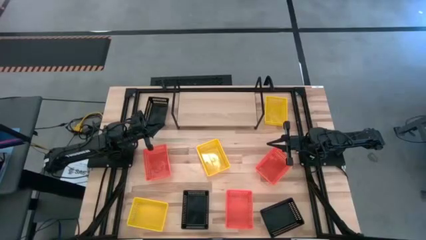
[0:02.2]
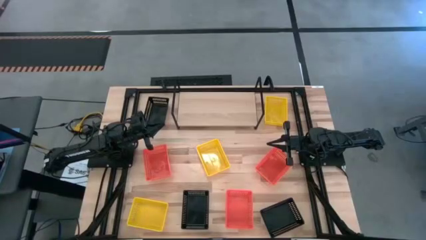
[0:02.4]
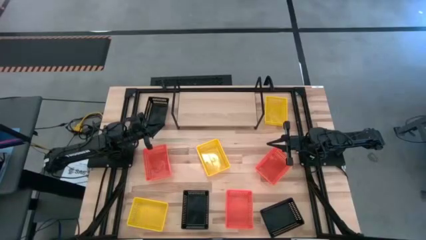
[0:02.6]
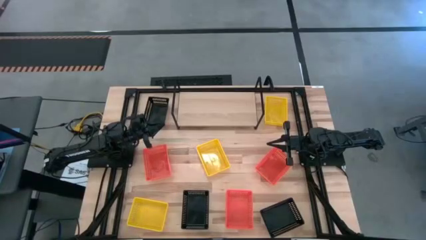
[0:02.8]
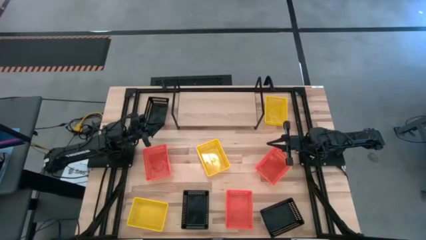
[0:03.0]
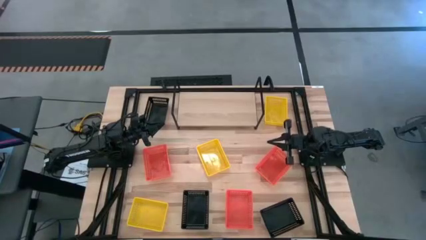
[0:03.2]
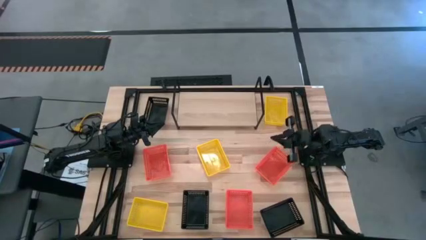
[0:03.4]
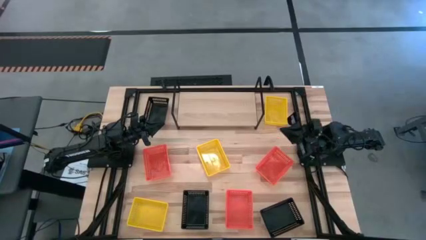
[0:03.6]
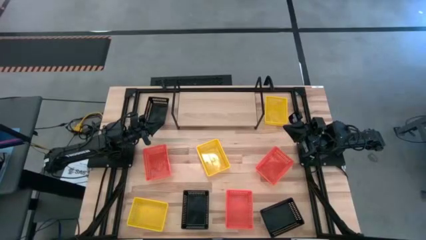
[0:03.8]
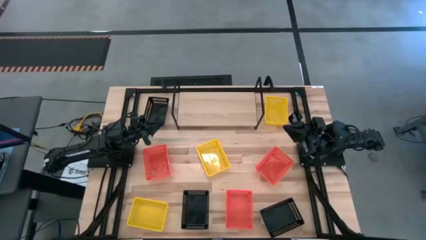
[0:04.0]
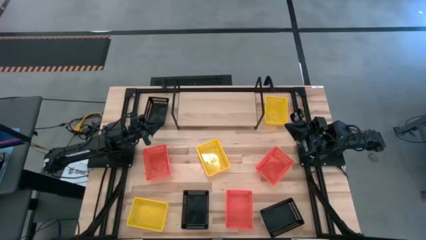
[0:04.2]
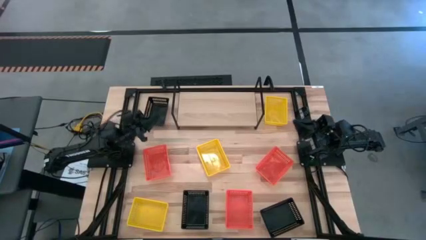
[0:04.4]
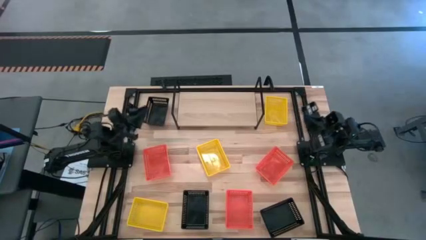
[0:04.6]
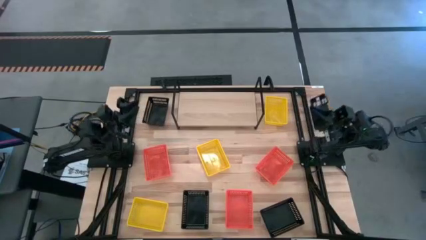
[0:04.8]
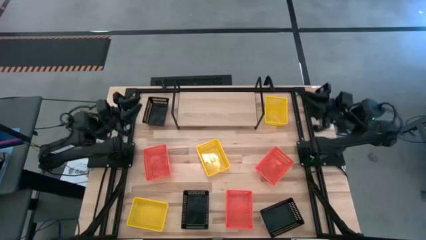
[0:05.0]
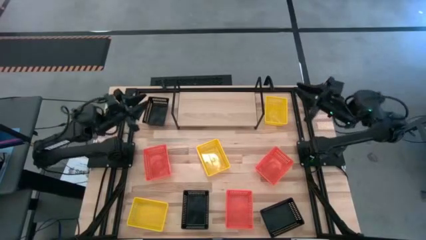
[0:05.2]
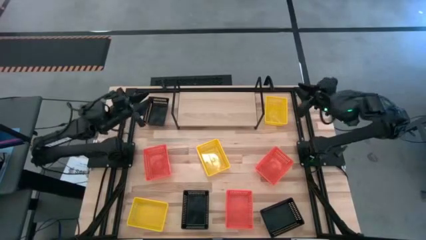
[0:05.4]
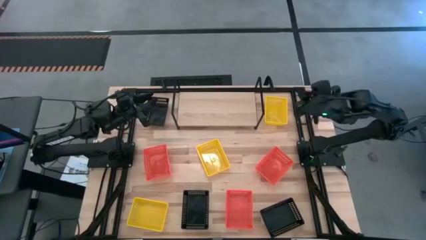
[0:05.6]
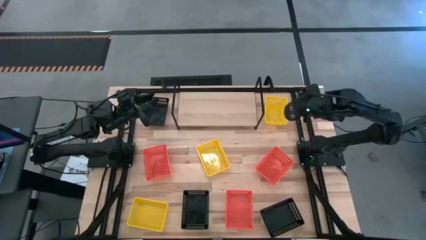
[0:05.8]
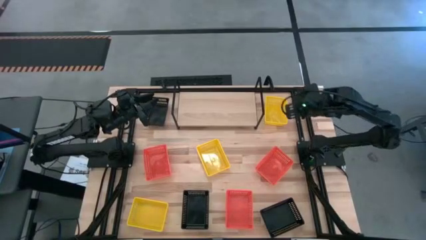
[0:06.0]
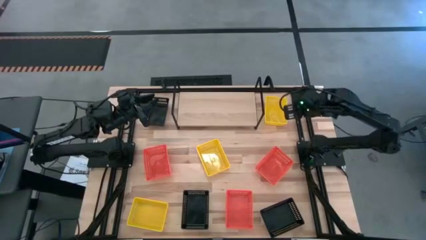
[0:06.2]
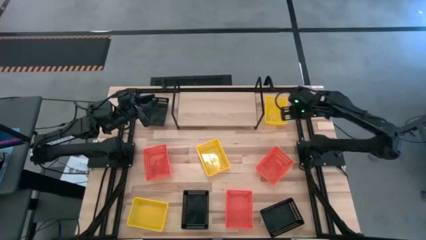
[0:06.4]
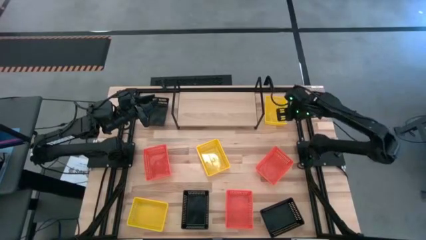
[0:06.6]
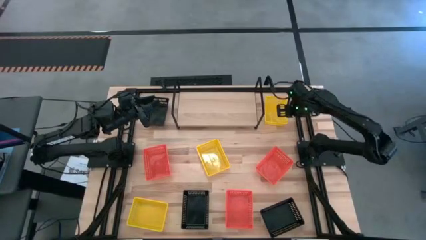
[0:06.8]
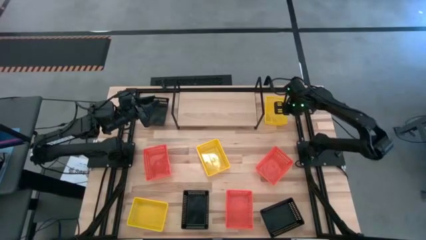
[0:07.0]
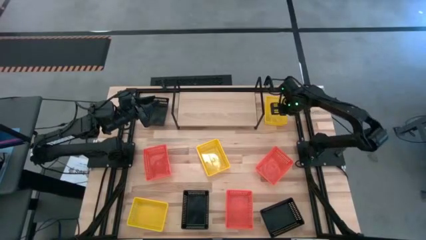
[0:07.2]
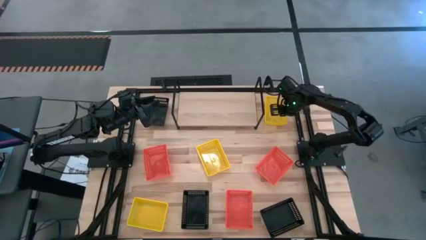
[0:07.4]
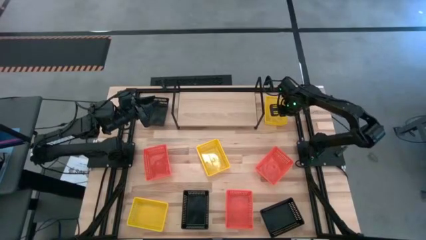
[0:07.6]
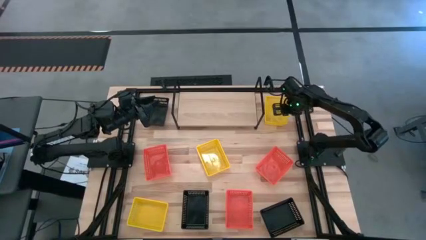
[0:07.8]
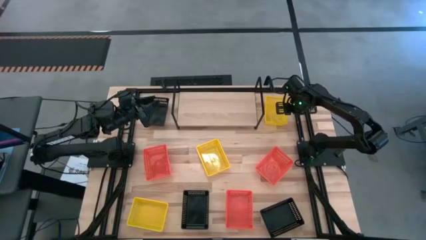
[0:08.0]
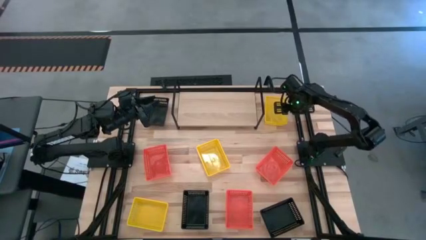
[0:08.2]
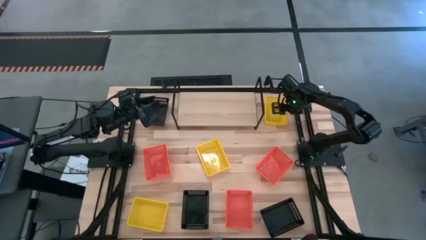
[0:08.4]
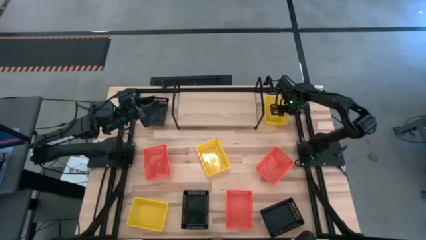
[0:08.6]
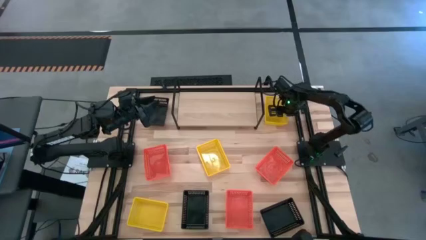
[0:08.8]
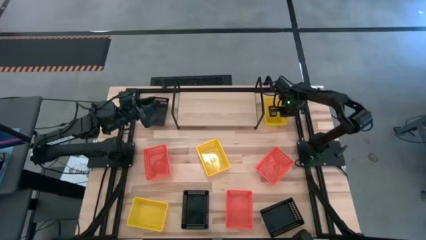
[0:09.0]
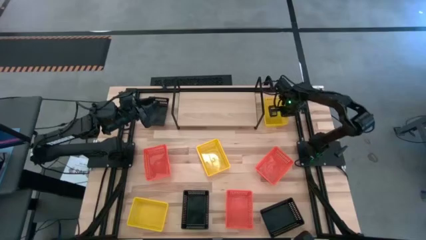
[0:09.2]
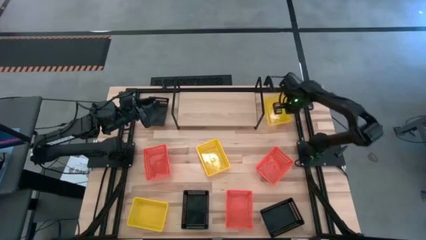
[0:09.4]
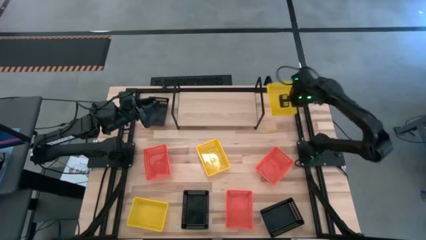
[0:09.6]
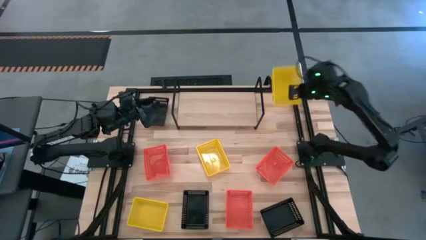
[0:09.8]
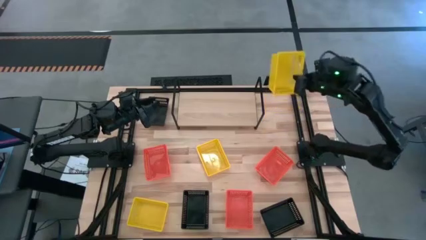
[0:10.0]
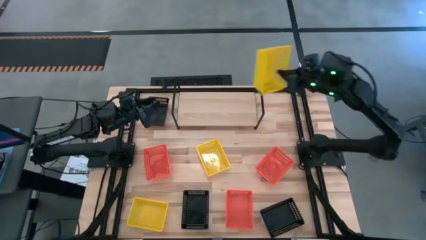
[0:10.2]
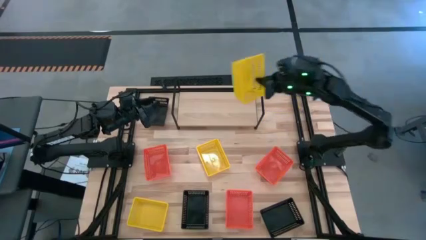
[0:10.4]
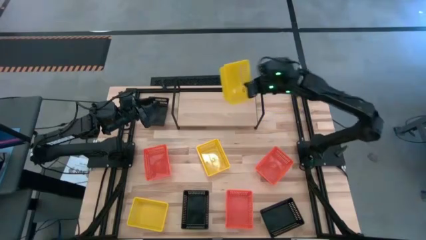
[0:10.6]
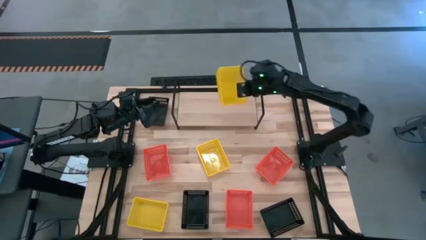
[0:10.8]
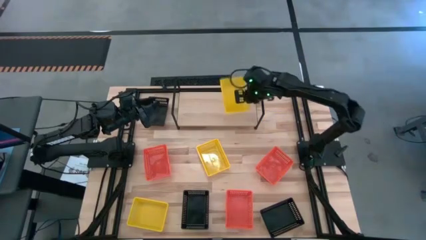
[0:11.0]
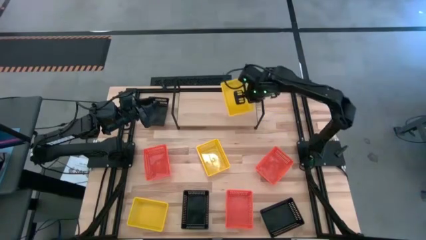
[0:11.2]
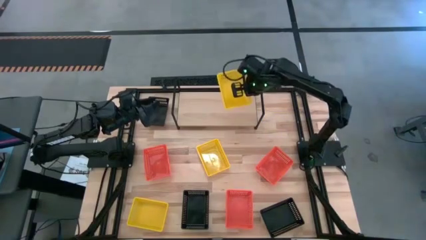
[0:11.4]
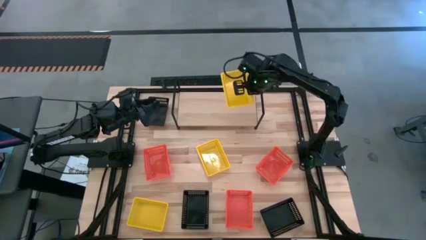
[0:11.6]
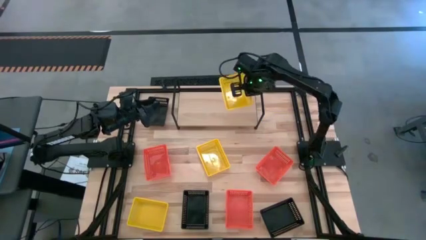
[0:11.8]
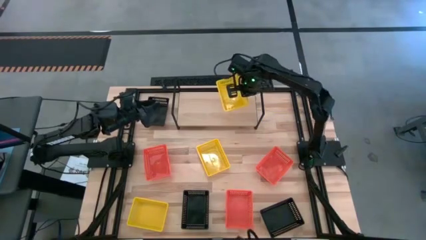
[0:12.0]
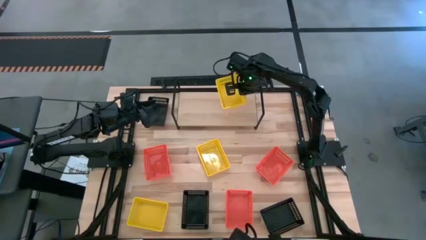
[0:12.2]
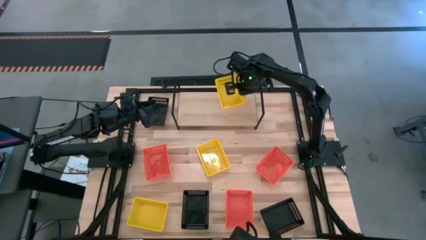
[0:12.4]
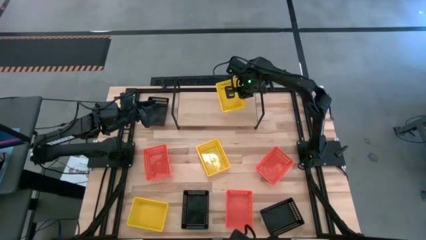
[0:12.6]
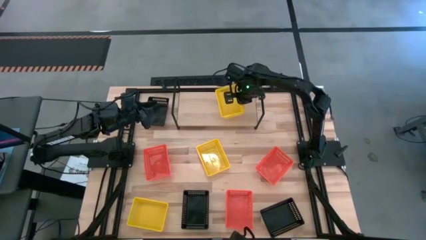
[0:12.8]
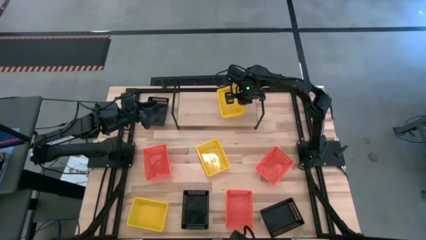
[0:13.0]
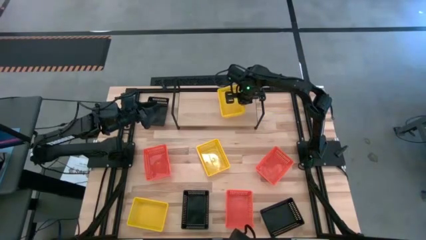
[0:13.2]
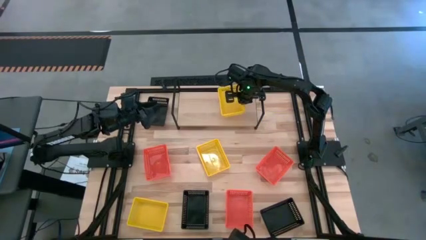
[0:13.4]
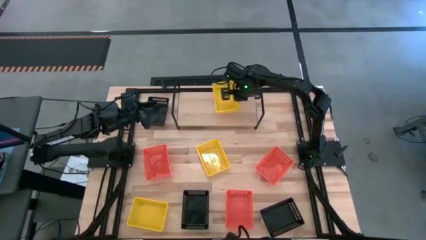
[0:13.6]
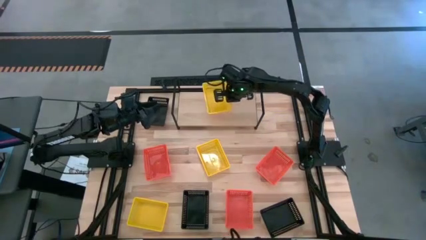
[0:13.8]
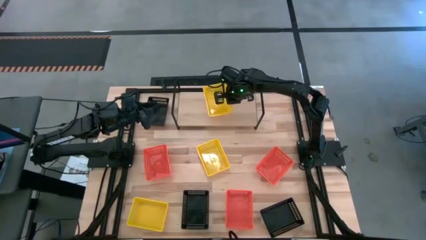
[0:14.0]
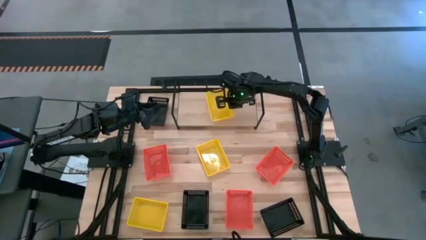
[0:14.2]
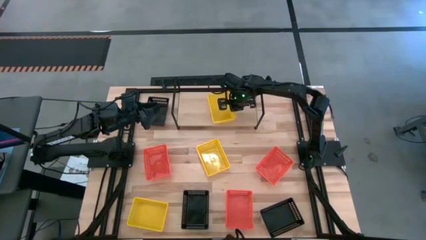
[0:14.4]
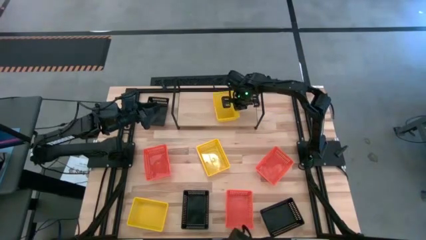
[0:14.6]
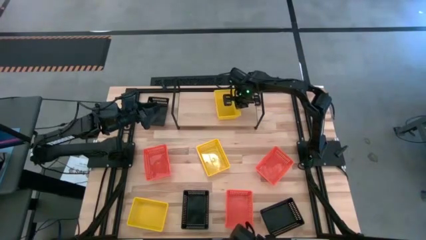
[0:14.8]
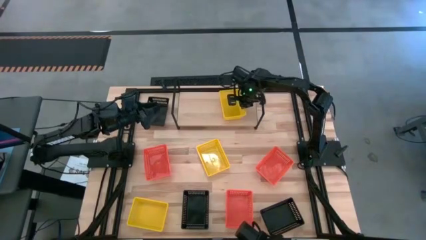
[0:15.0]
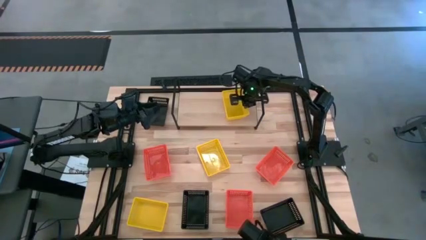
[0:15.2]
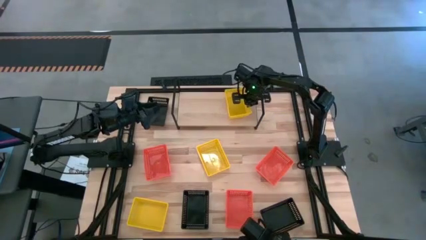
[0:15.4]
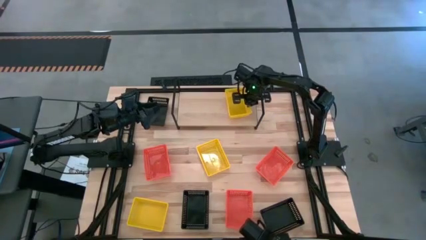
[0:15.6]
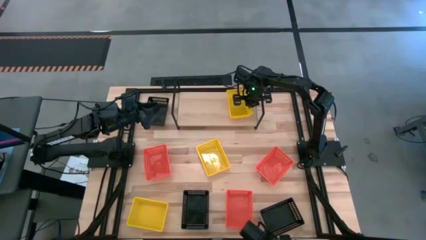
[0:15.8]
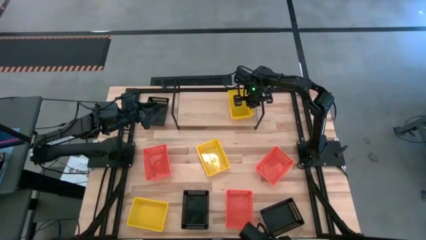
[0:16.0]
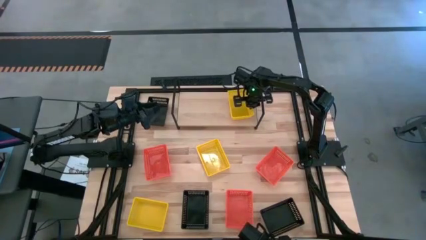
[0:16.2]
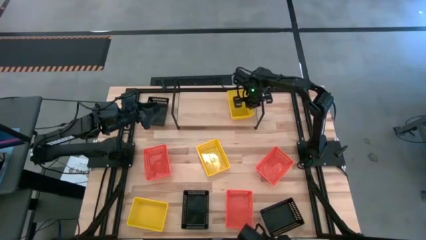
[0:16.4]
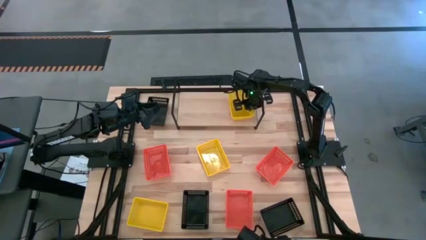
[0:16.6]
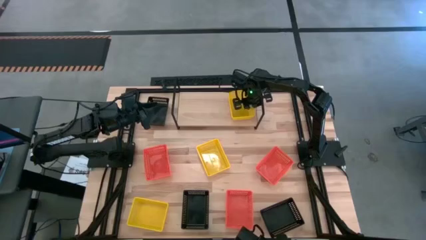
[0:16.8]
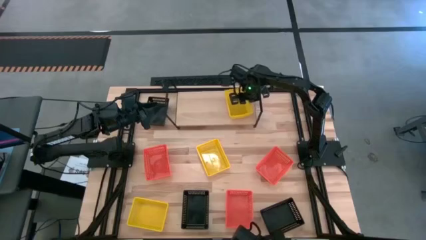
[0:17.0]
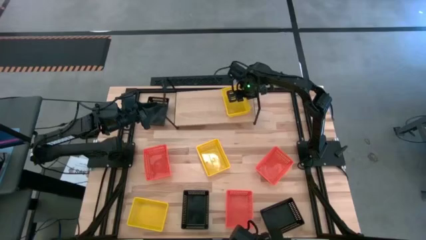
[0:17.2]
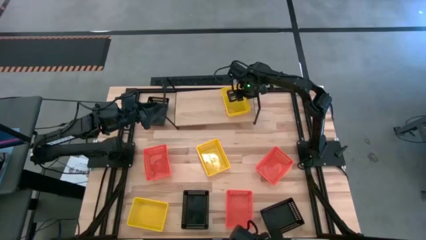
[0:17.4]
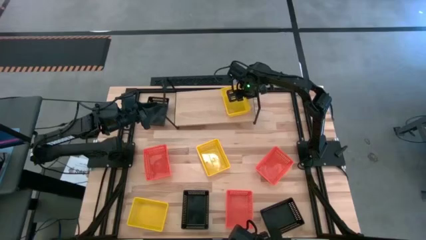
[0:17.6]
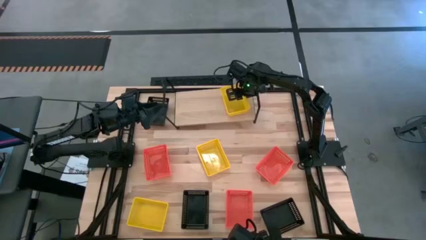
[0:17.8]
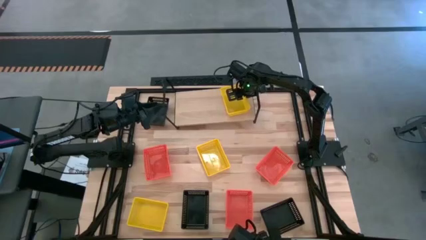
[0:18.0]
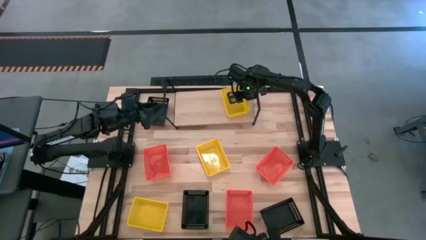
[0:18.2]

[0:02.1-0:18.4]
Task: Stack baskets on shelf by color
Put the top right yellow basket on the shelf
